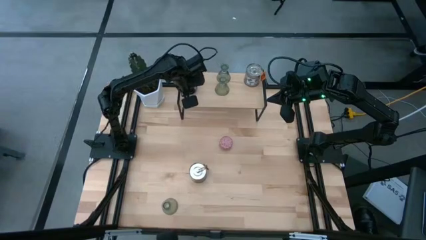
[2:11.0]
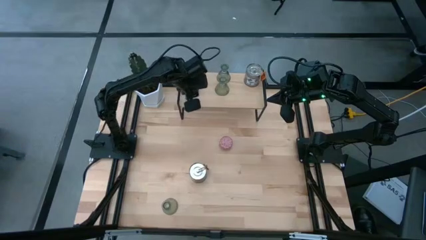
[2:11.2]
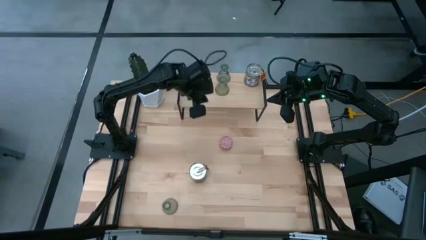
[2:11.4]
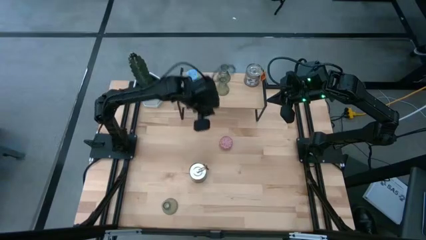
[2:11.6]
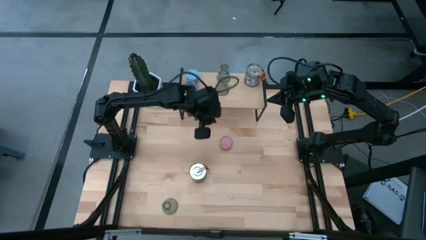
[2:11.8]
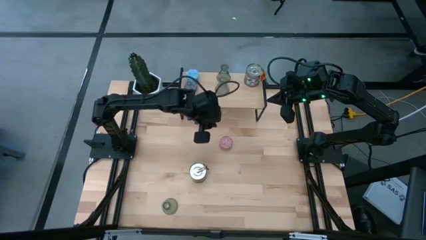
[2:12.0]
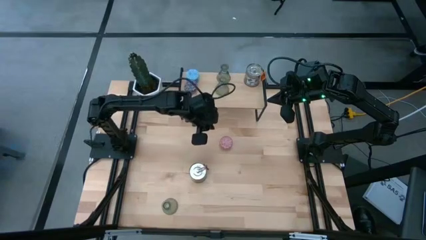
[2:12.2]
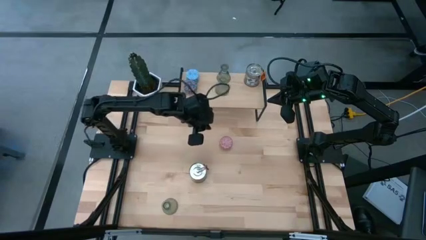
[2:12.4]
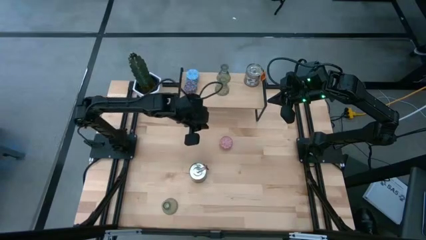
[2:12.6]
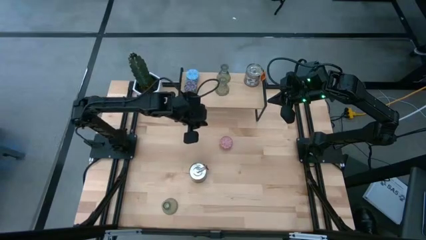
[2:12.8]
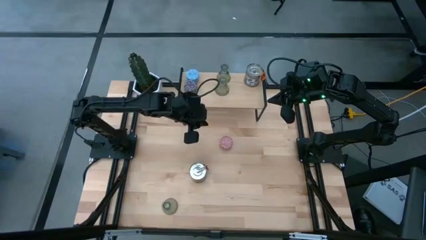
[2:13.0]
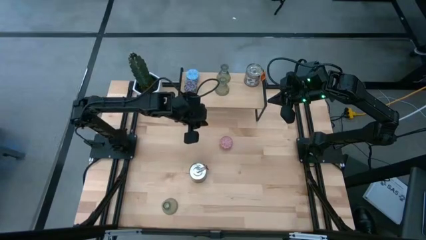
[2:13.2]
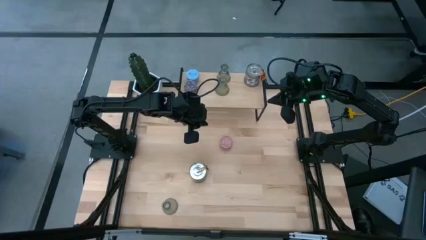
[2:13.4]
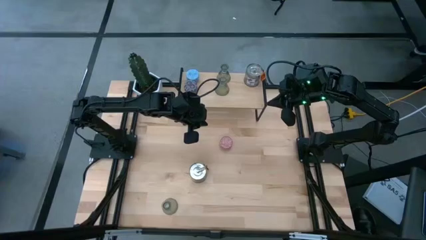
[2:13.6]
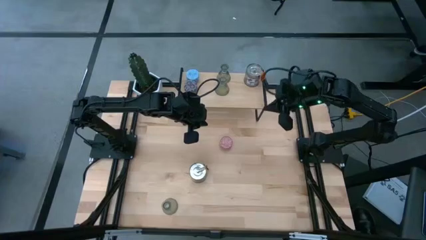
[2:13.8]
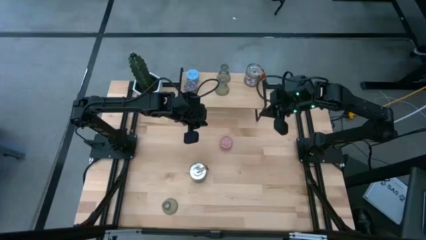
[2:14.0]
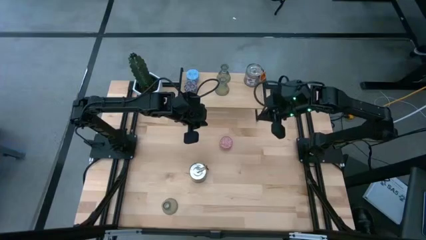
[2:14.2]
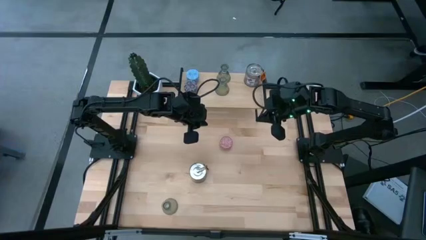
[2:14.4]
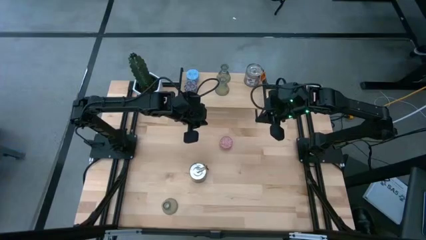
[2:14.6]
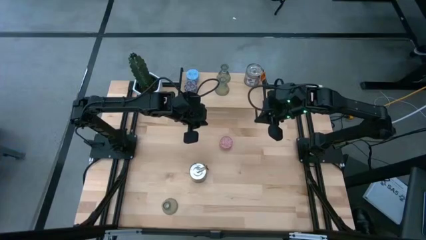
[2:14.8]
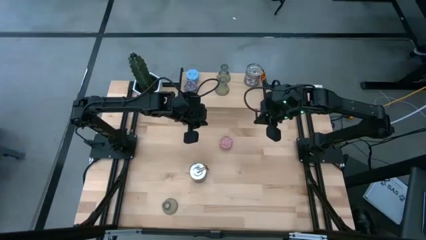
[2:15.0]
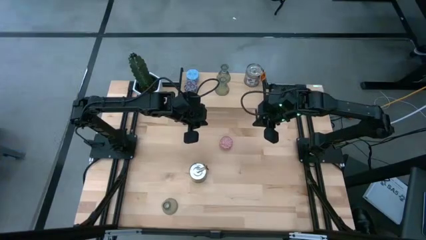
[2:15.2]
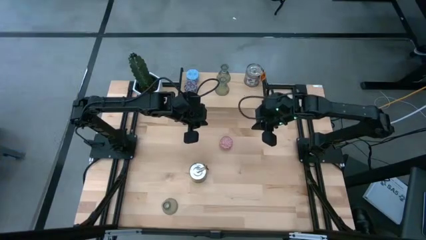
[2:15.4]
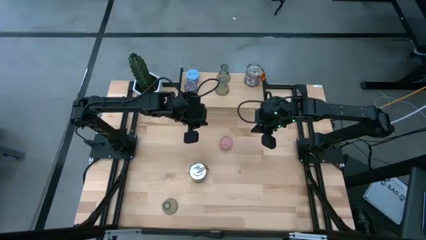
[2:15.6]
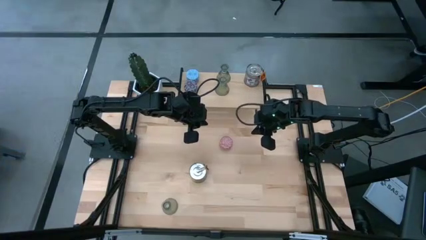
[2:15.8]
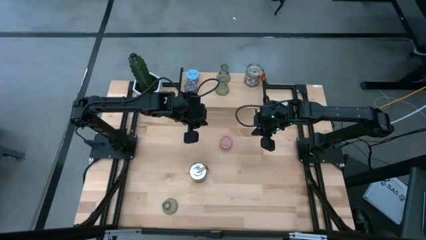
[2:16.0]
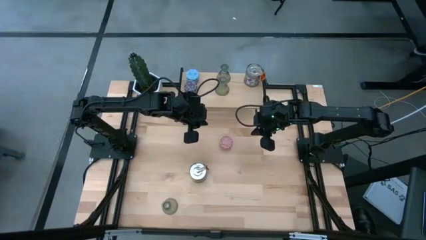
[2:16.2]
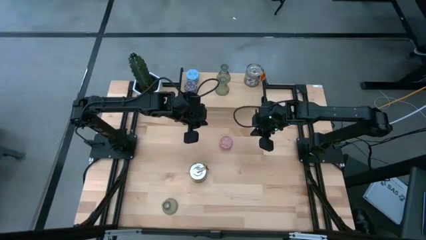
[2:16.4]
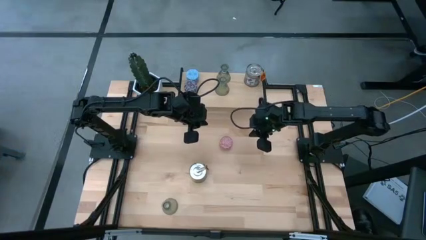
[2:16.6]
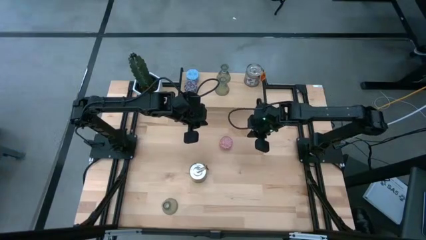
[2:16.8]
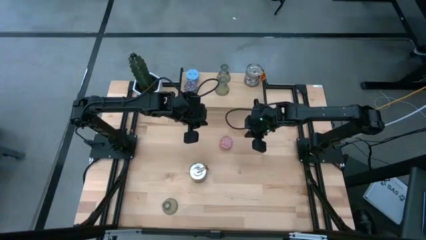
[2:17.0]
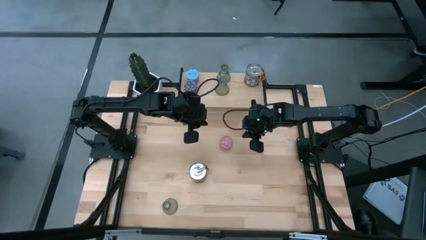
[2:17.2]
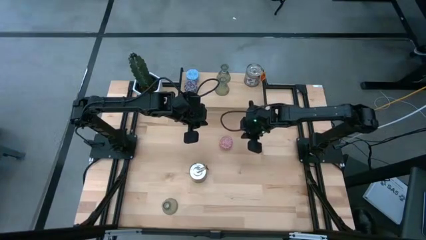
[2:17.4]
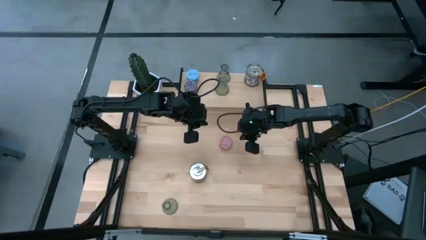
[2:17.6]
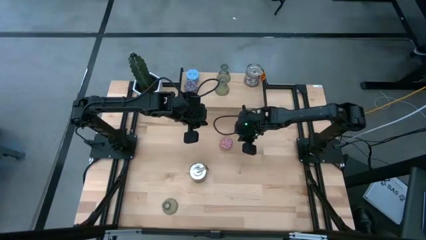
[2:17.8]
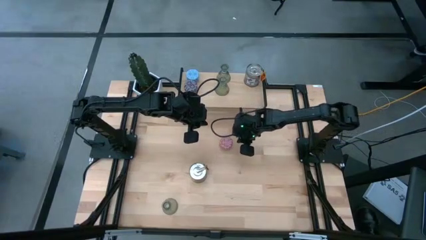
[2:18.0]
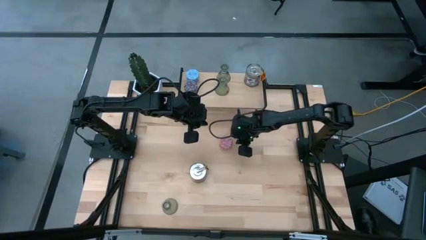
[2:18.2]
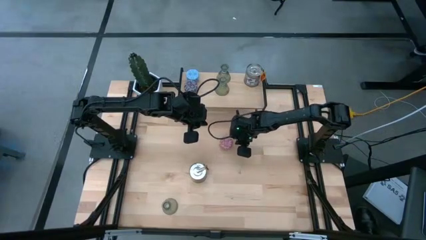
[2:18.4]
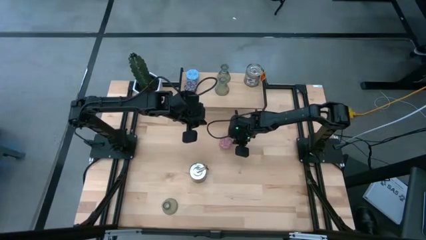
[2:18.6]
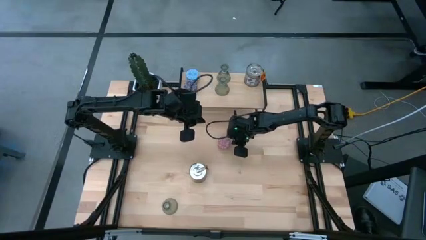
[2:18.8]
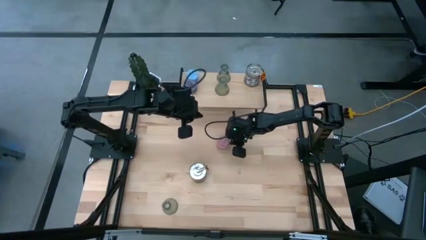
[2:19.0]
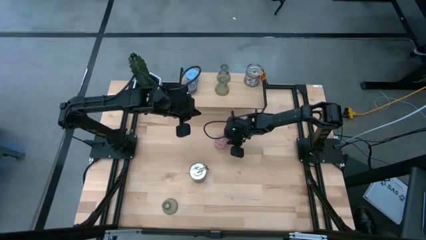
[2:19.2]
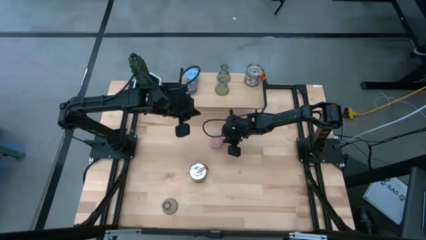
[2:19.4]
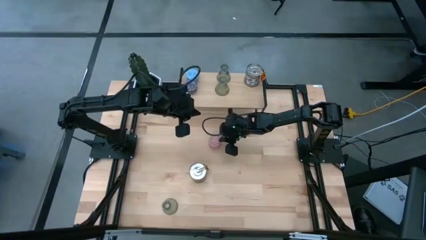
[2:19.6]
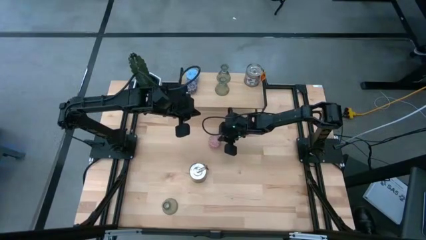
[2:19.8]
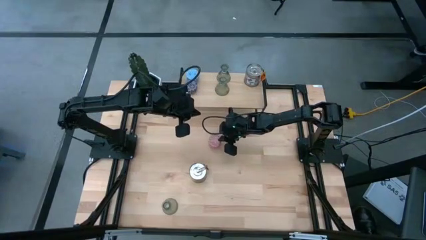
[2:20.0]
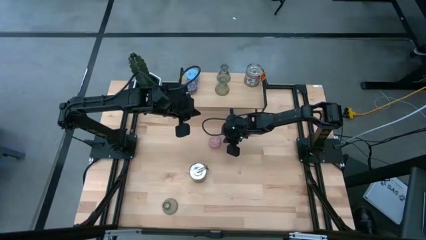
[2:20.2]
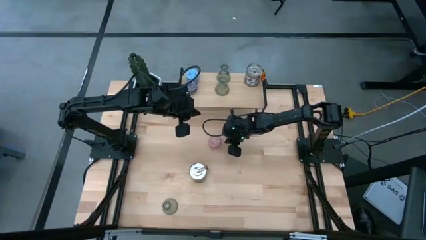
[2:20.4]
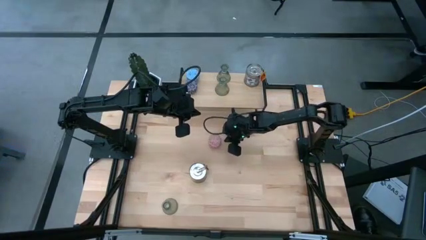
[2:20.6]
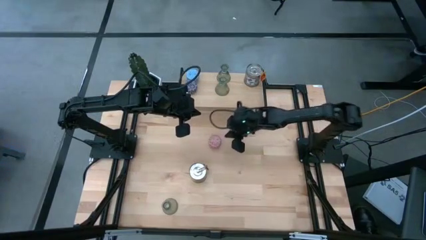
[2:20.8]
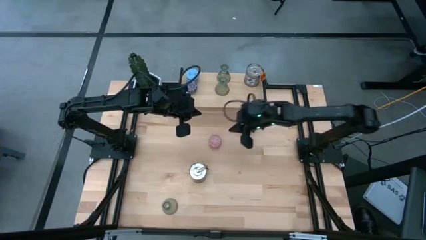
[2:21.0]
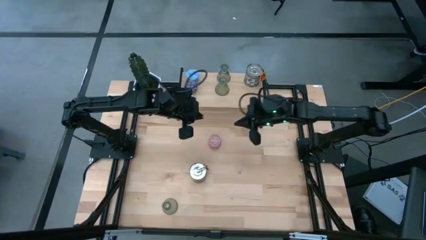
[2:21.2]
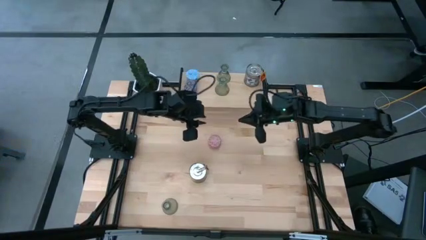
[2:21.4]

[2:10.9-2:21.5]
Task: Pick & Place candle stick holders
Put the pink scented candle aligned with the red scented candle on the shelf
